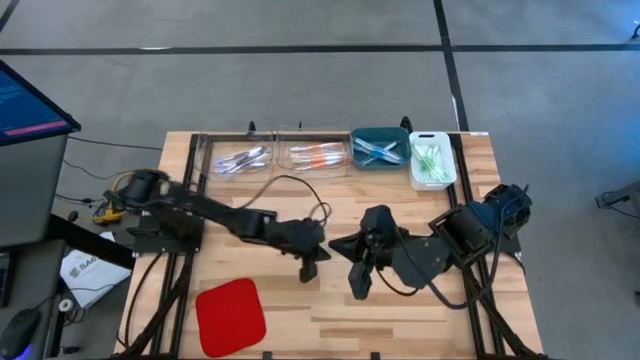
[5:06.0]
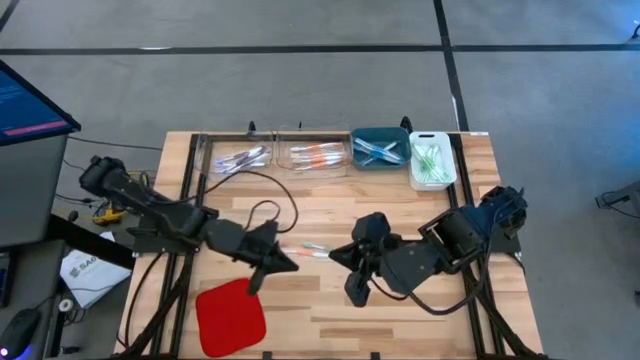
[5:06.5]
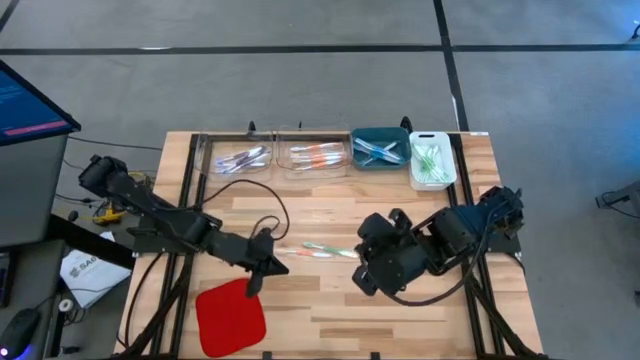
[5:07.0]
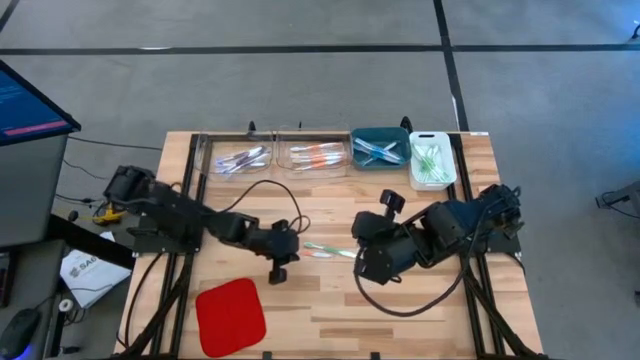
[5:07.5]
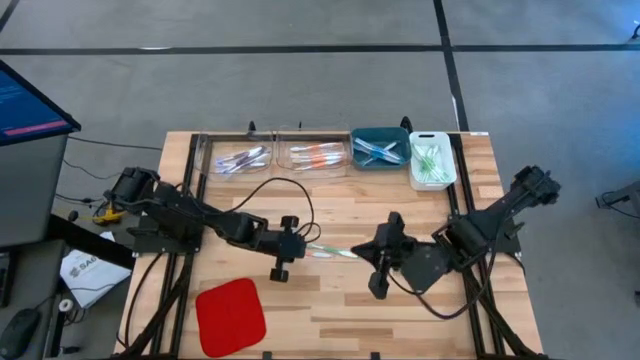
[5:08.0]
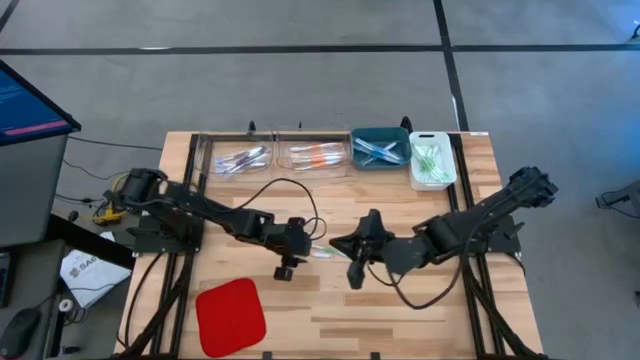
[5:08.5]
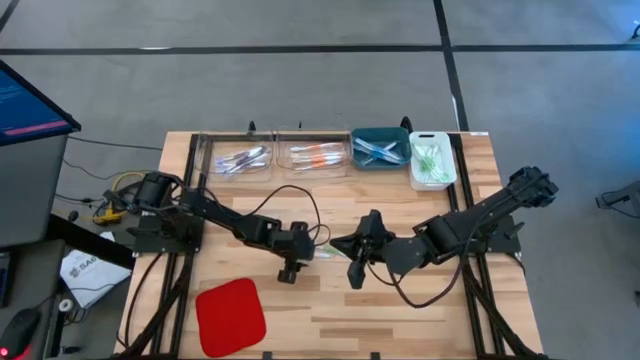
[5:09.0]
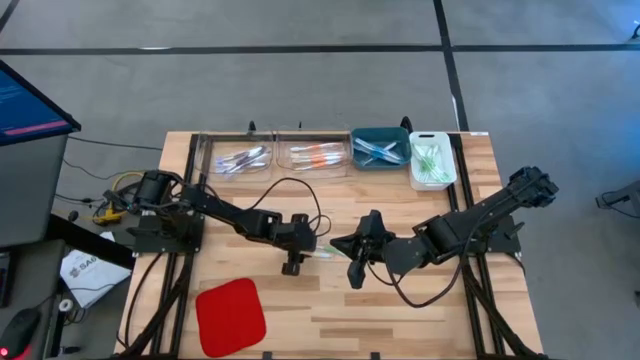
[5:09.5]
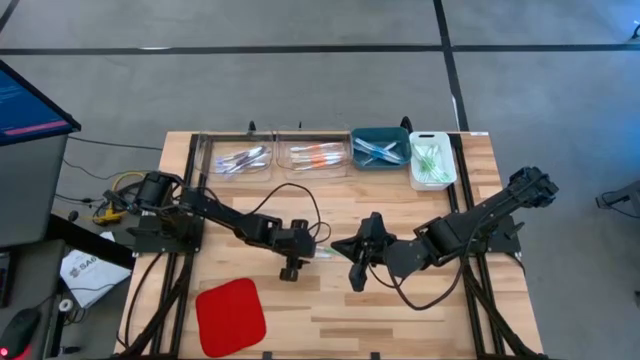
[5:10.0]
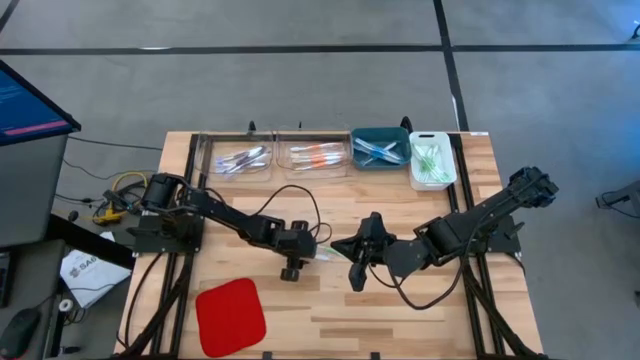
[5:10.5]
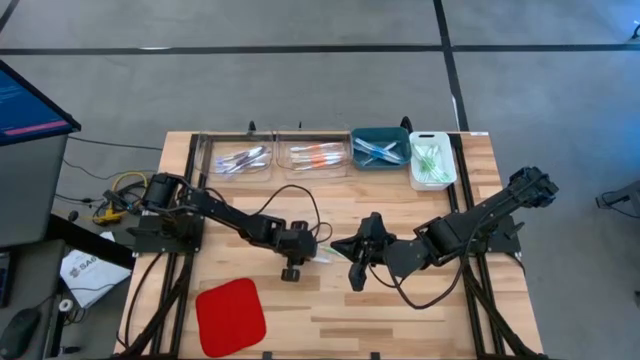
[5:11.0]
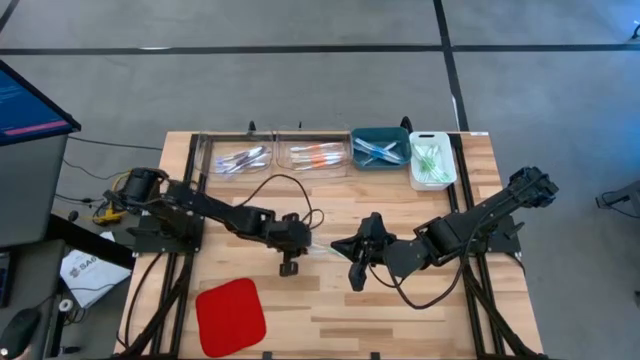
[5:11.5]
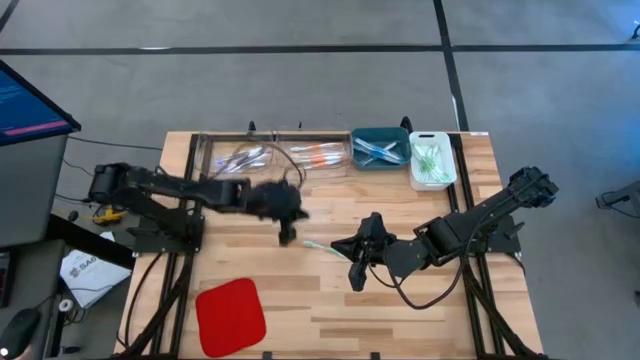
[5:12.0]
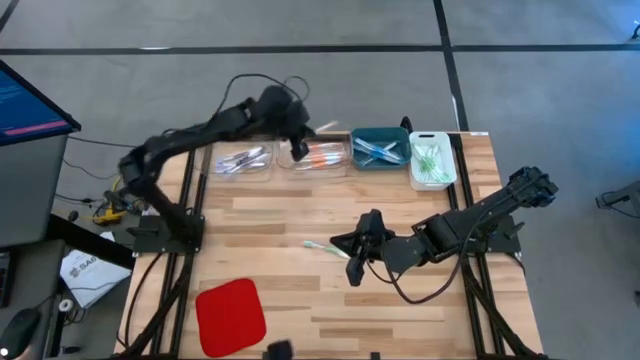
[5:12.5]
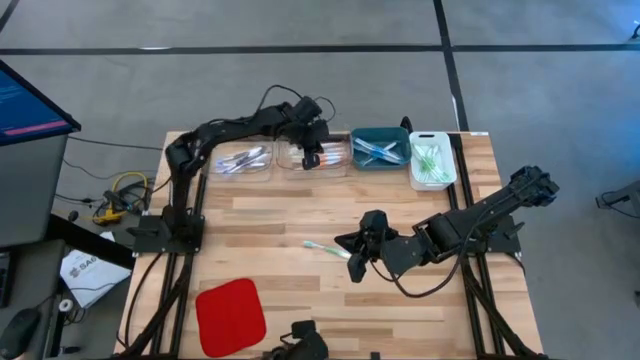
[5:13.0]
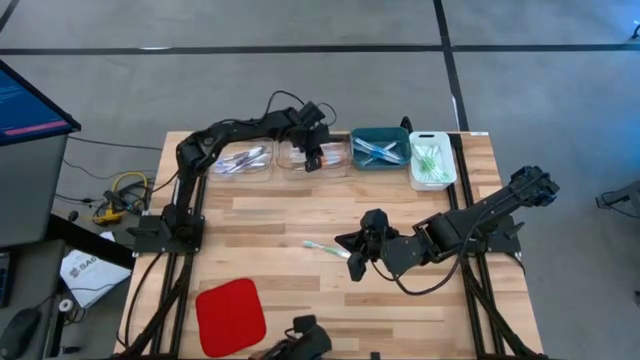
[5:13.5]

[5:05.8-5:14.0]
Task: Pick & Place Toothbrushes
Put the orange toothbrush into the right transparent bin

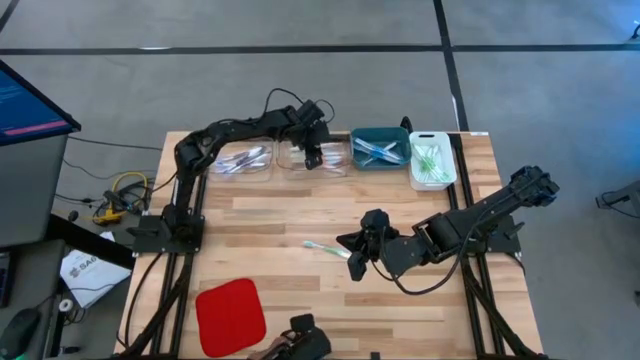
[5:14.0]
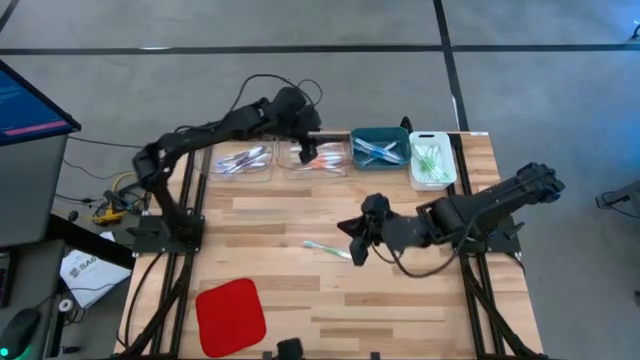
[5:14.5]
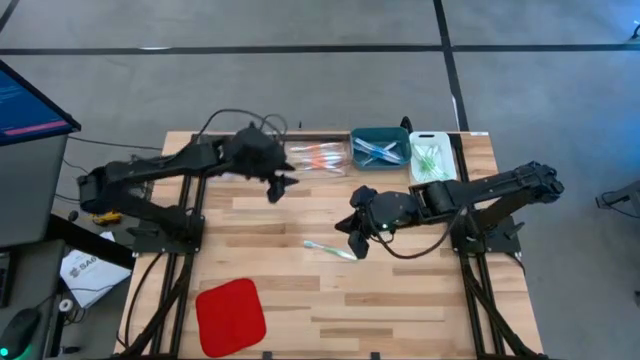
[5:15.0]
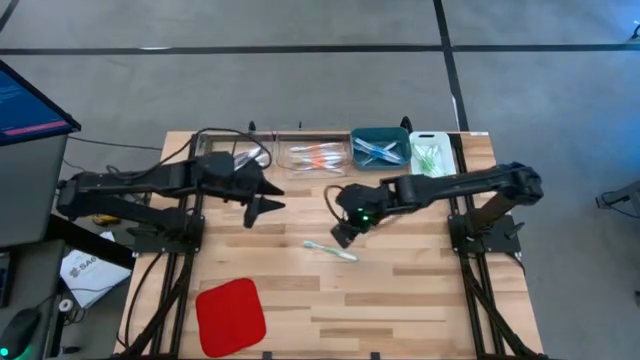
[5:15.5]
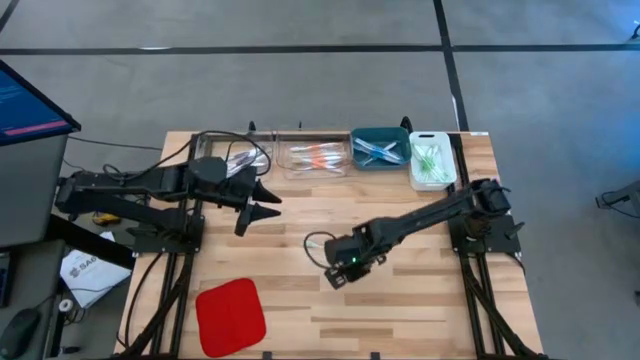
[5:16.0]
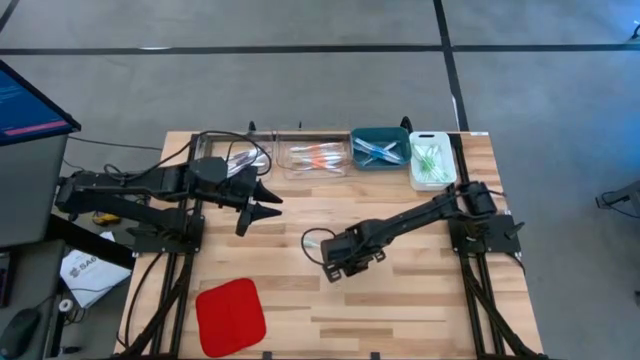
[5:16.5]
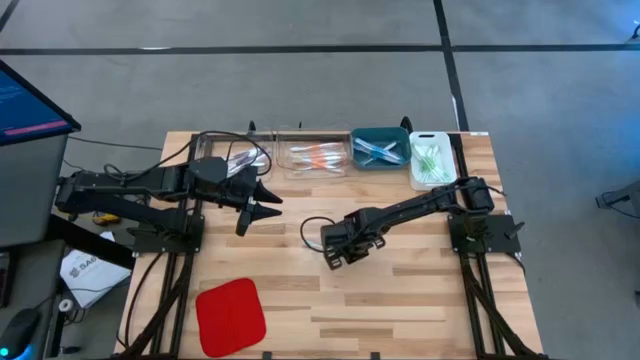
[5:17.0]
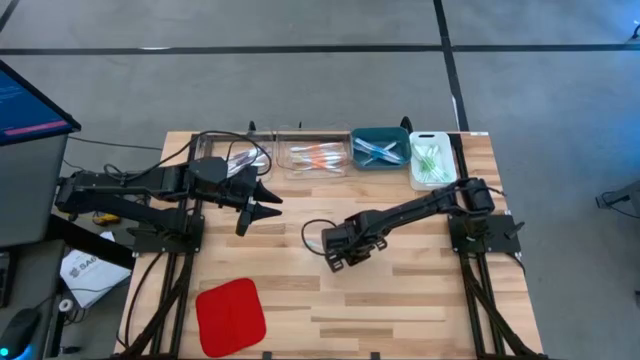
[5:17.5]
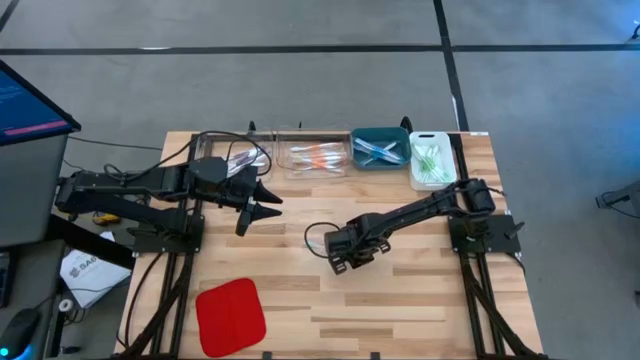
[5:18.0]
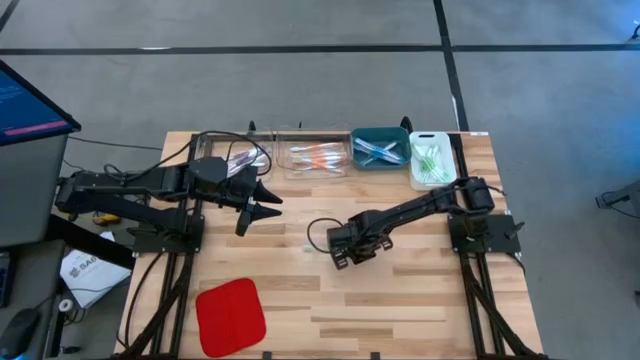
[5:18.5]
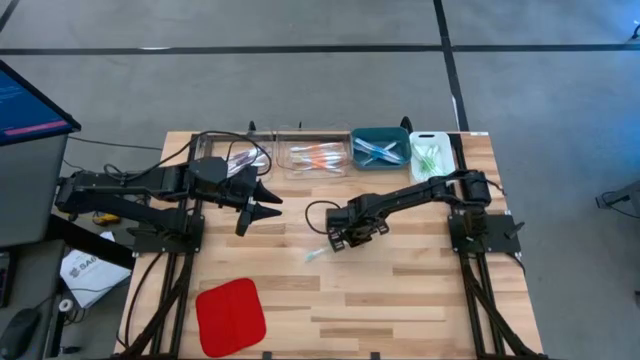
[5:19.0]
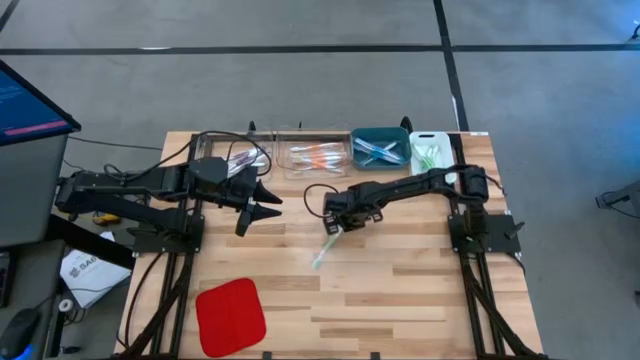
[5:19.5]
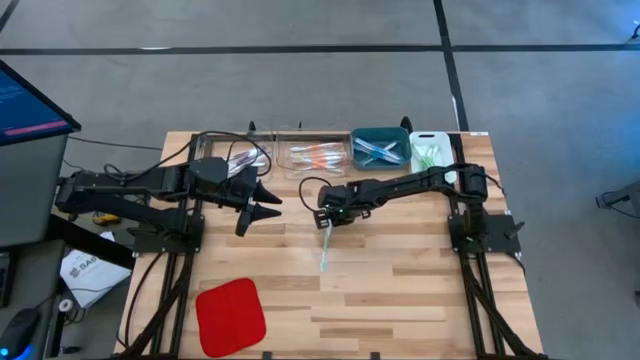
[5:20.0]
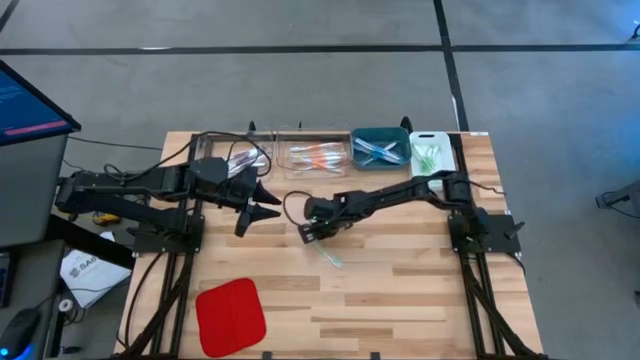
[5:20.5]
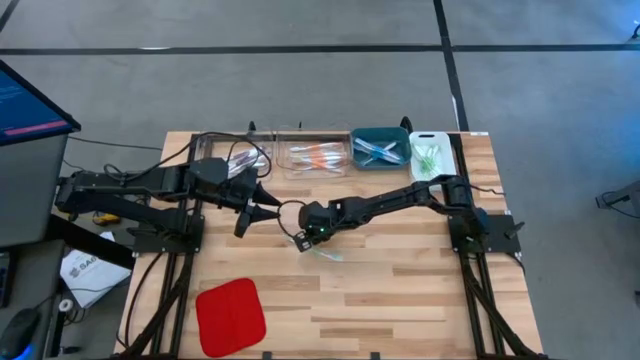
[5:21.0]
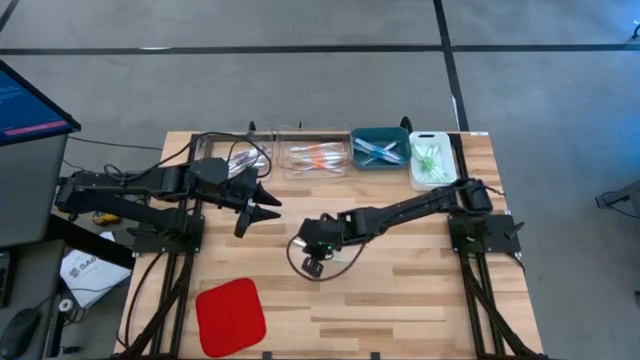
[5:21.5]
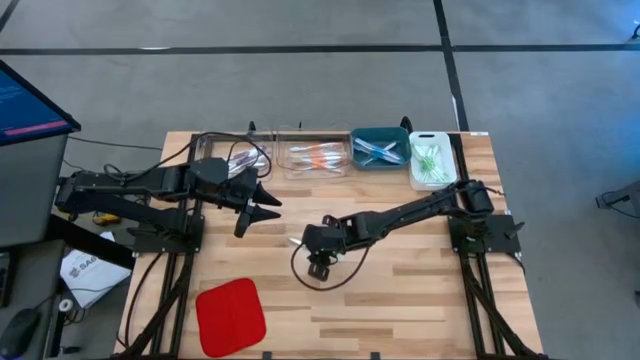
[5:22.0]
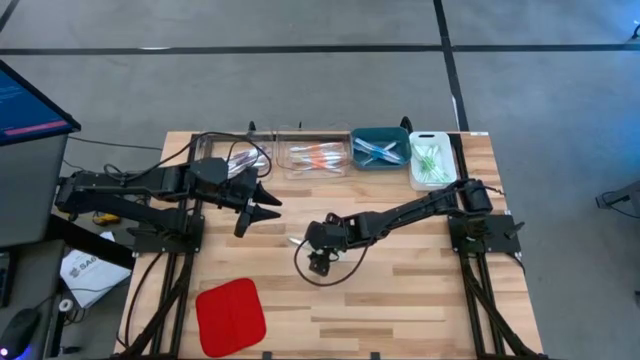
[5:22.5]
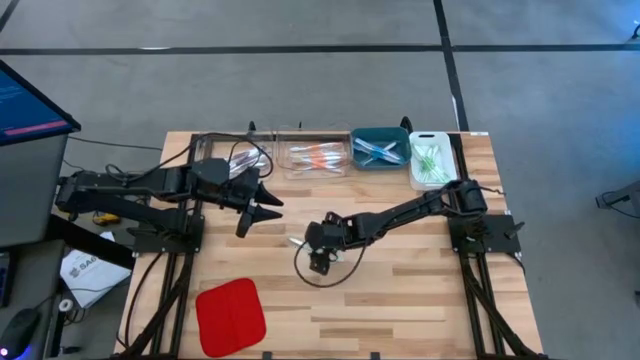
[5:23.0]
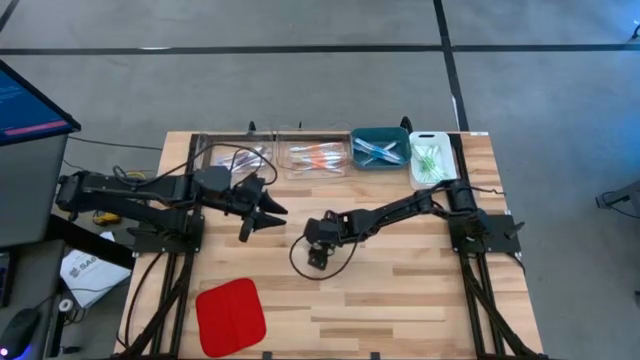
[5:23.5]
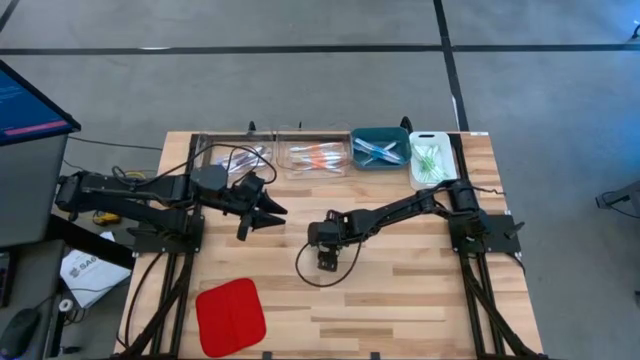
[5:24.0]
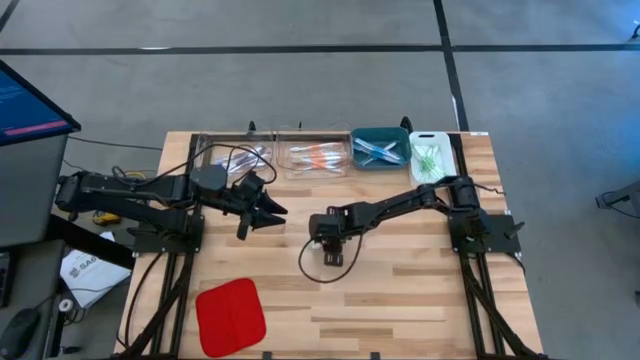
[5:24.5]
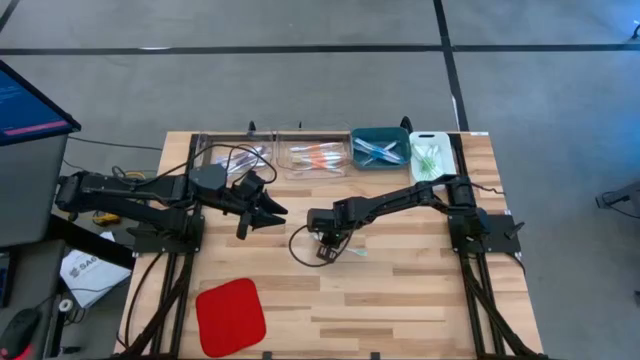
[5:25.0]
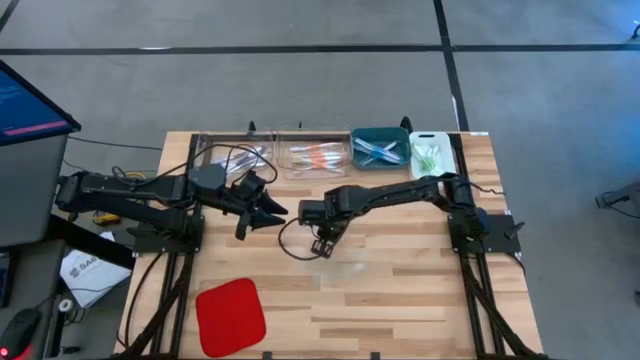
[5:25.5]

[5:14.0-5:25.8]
Put the green toothbrush into the white bin
